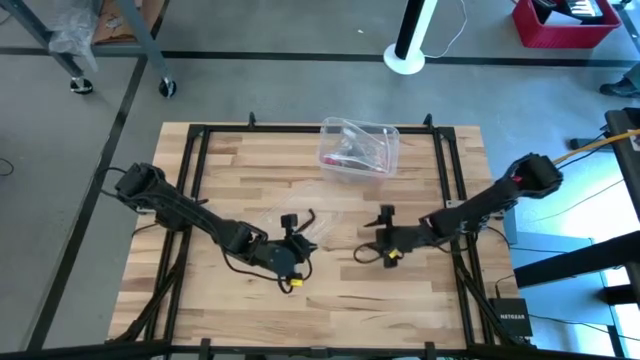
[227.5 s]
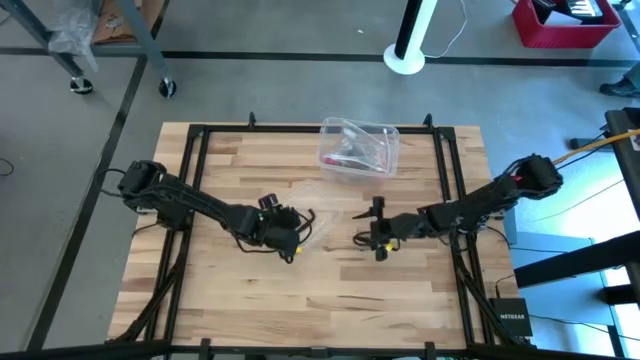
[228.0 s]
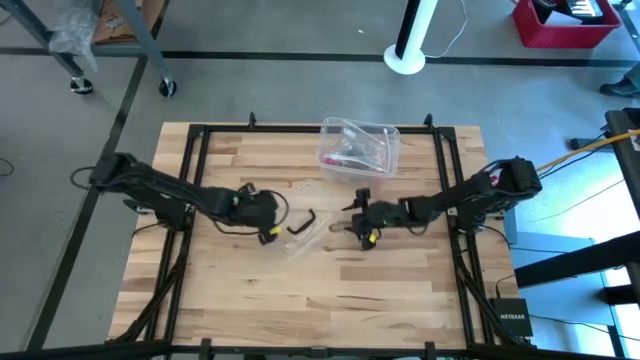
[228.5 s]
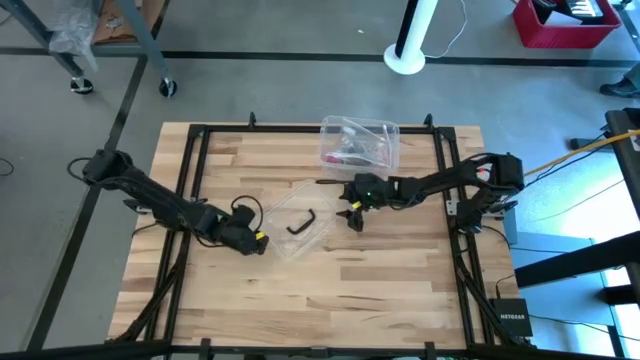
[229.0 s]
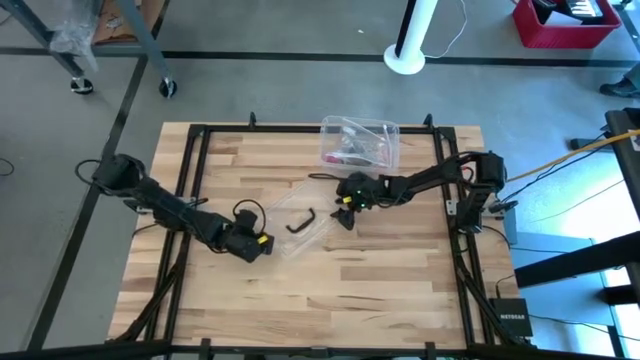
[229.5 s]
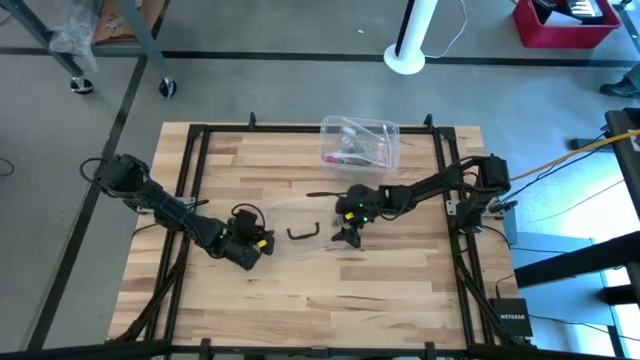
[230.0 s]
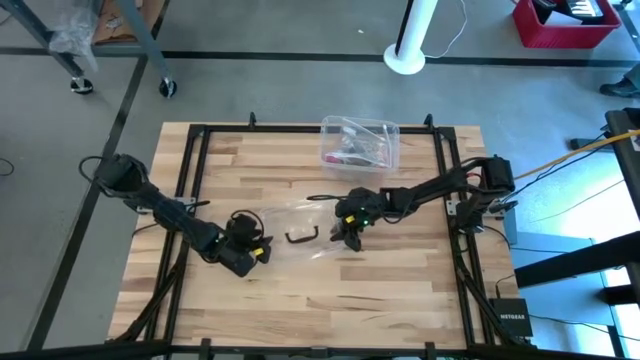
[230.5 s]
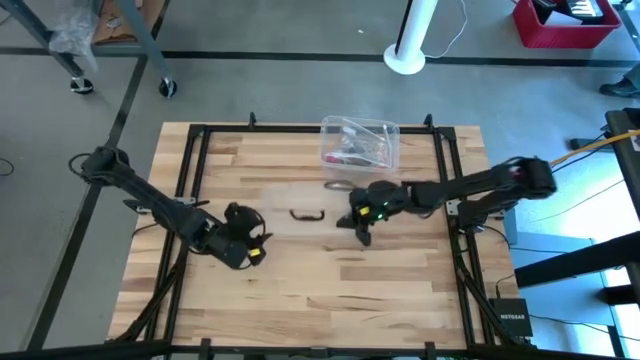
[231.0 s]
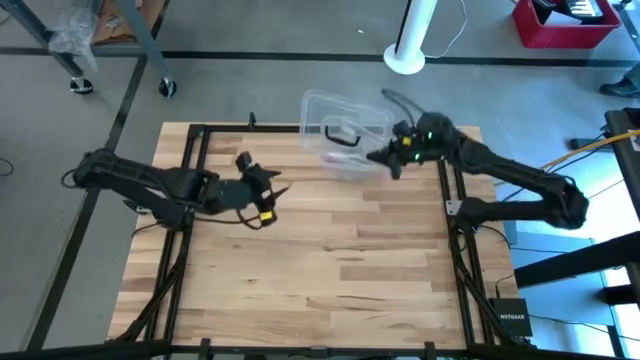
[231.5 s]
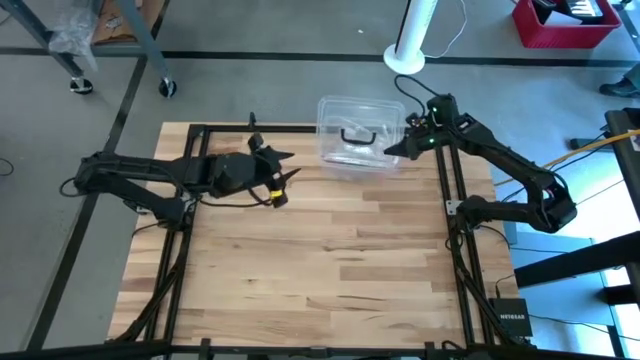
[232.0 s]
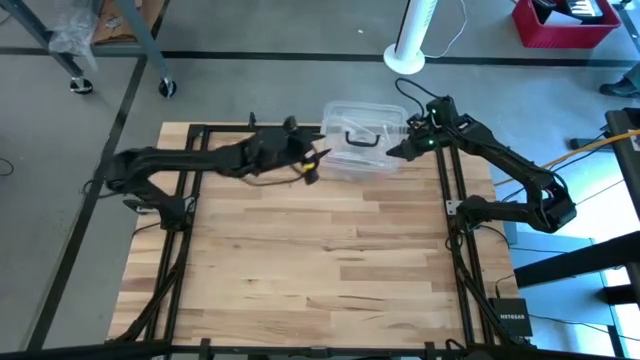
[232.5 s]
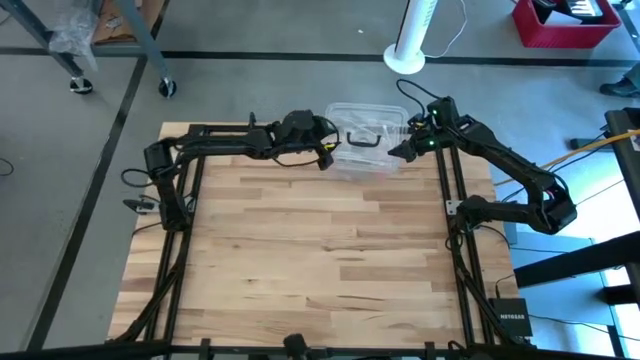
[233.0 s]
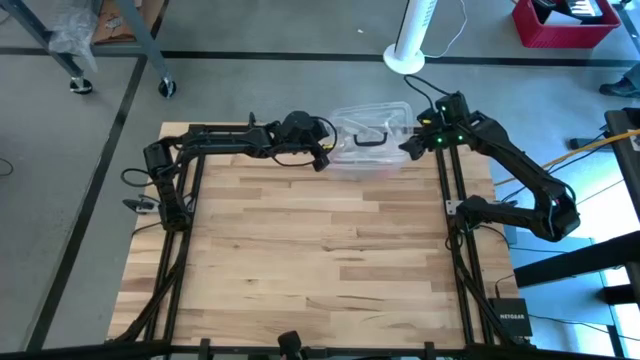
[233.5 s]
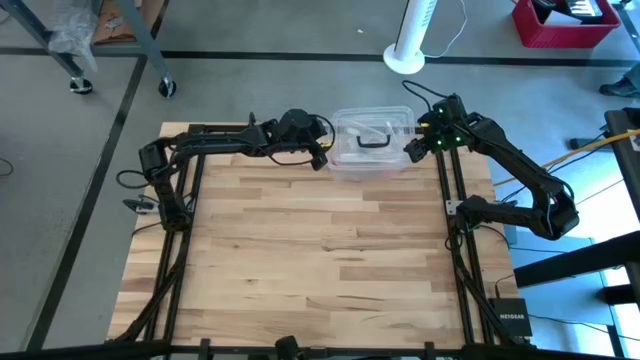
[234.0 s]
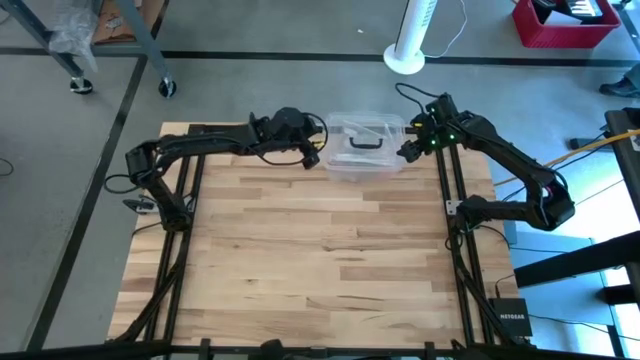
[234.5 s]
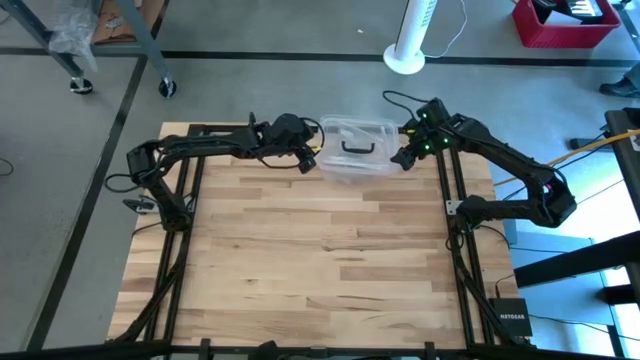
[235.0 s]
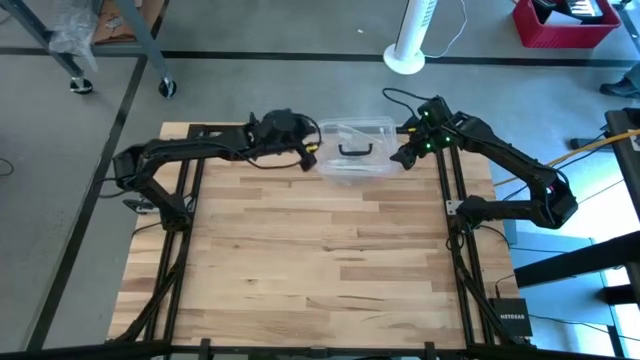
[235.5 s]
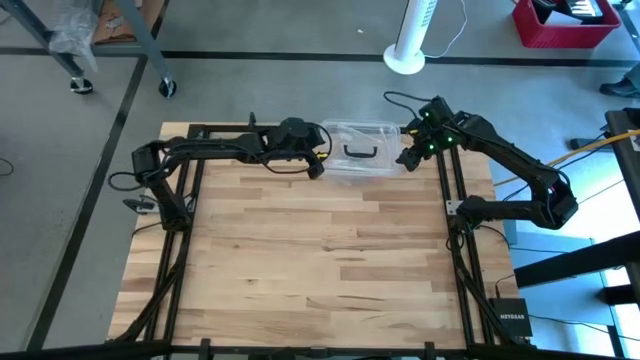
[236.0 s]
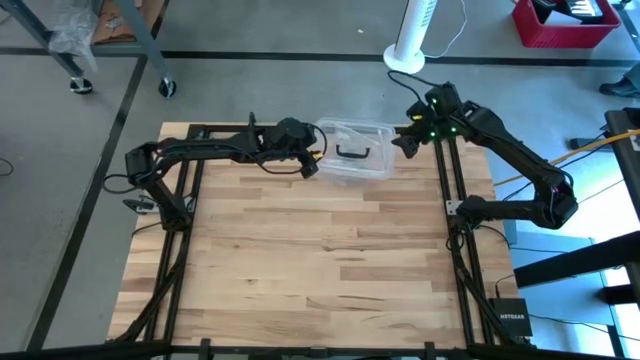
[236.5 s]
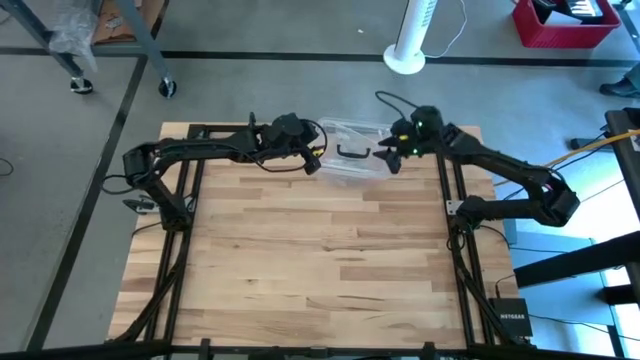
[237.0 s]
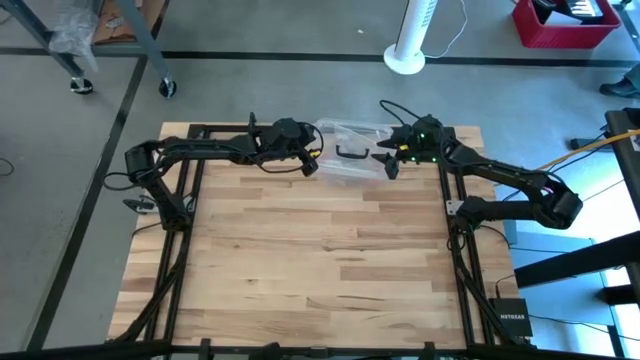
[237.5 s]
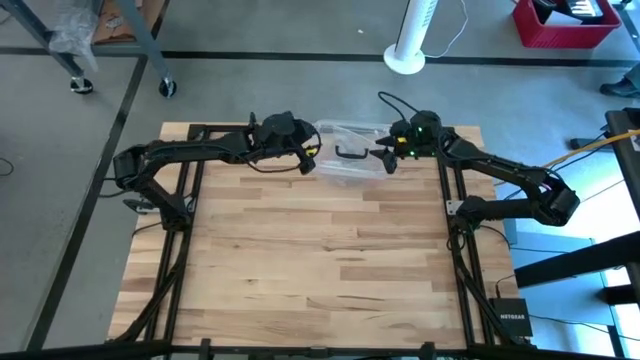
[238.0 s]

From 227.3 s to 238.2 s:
Task: Roll bandage
Close the transparent bin

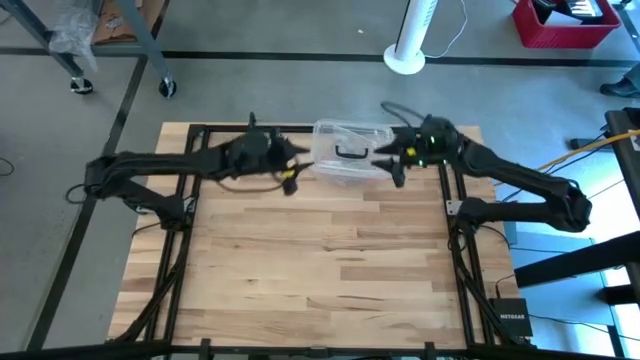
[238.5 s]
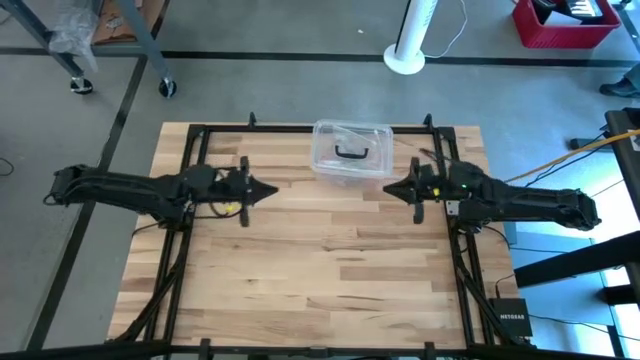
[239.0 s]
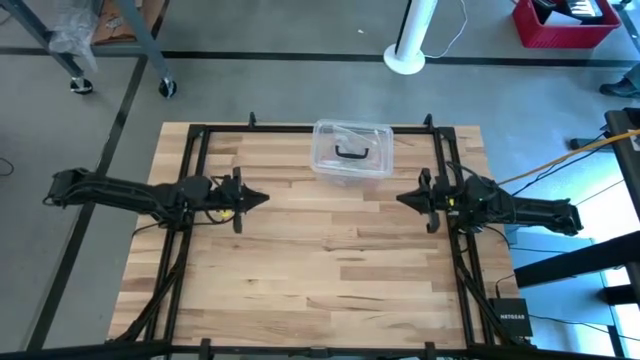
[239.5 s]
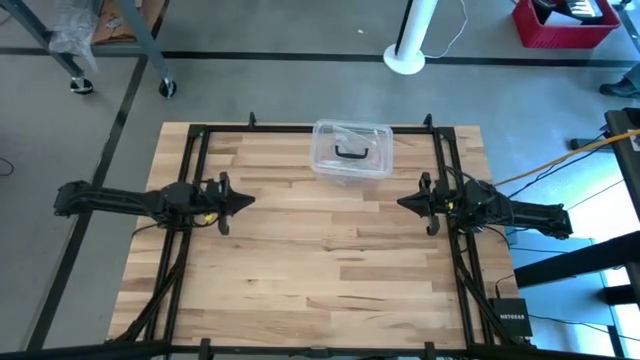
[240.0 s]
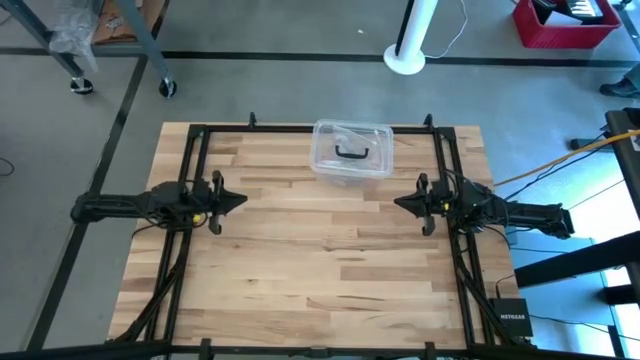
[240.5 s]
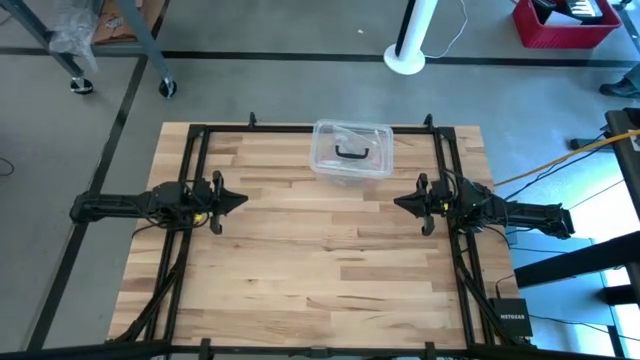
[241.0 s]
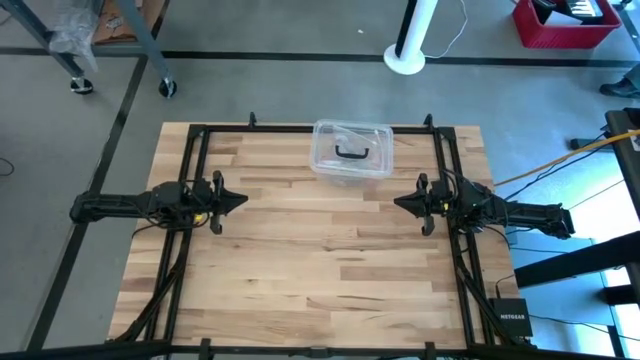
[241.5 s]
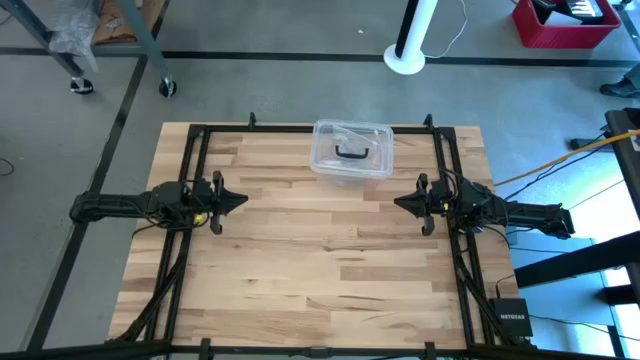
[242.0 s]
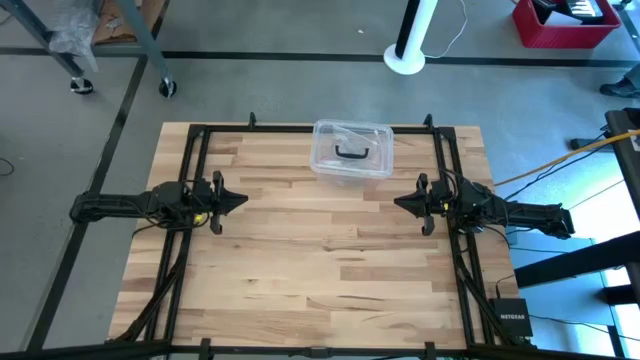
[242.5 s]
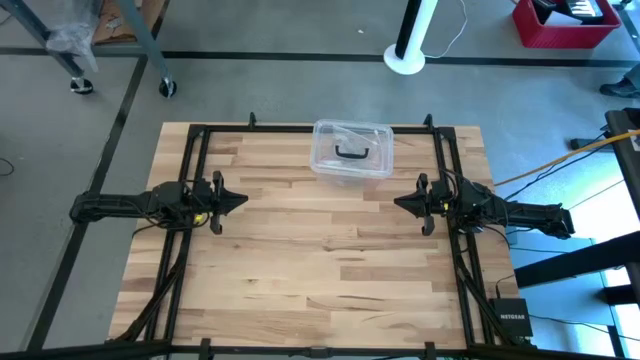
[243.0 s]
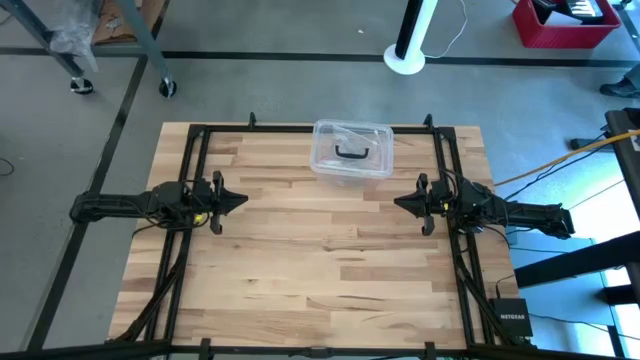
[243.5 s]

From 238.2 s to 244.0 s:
Return to Home Position

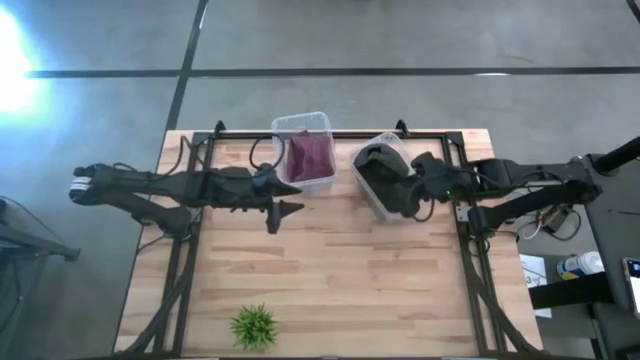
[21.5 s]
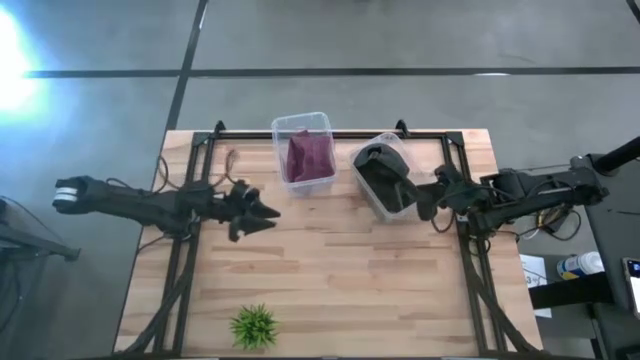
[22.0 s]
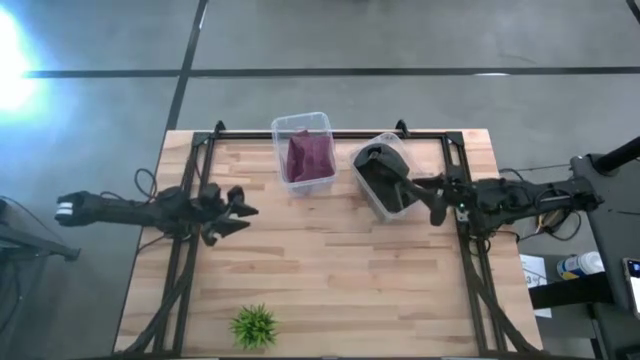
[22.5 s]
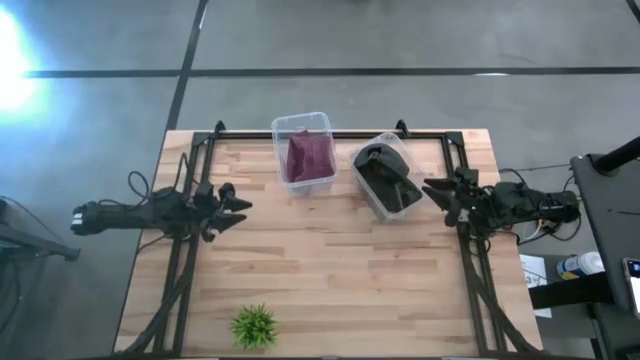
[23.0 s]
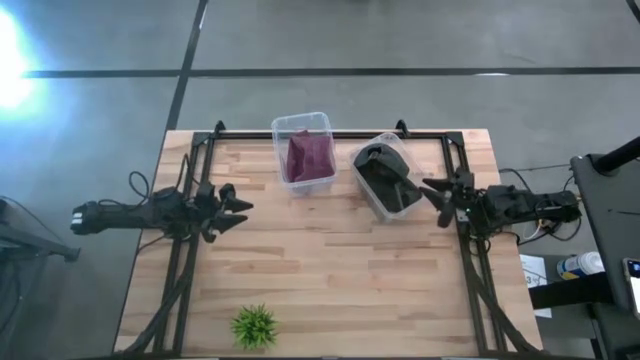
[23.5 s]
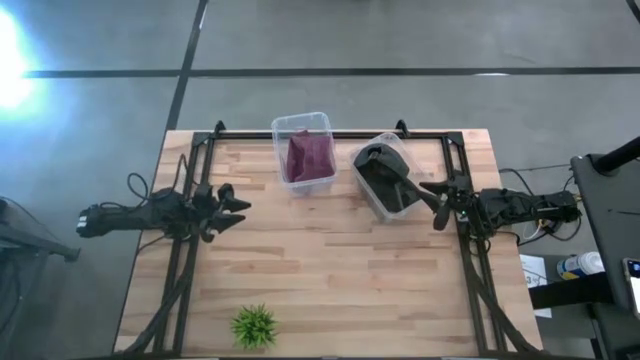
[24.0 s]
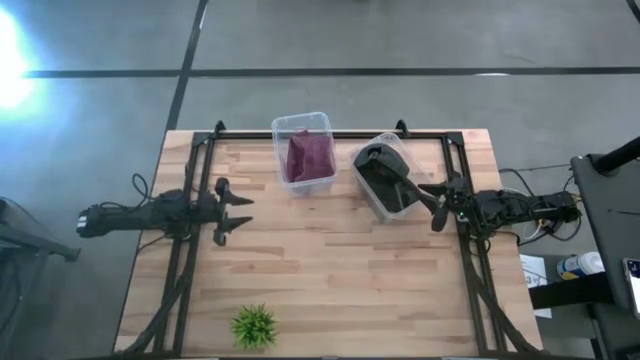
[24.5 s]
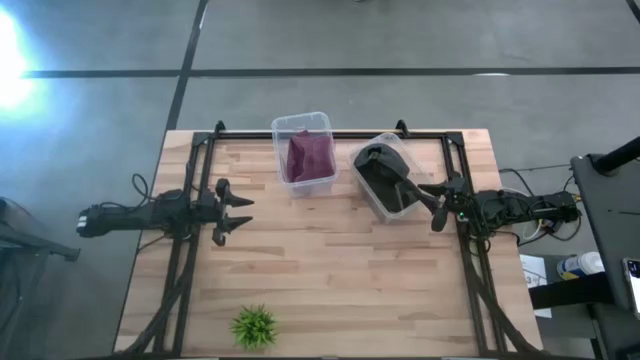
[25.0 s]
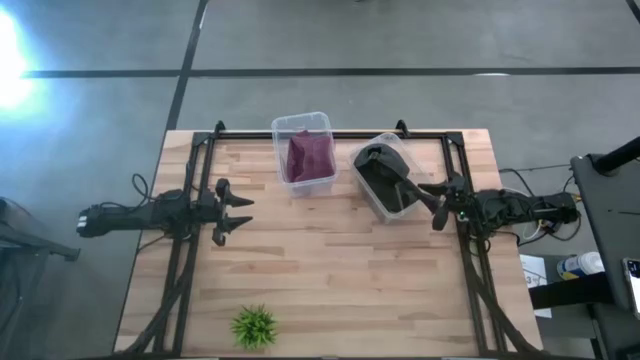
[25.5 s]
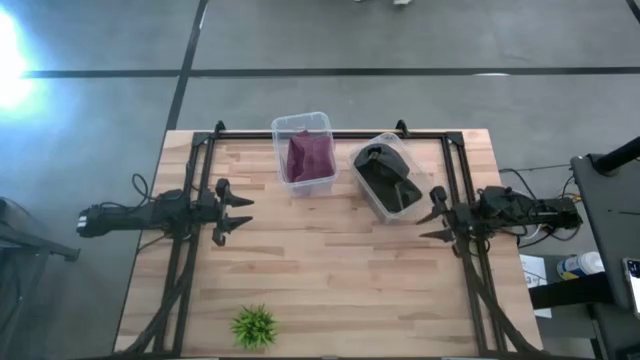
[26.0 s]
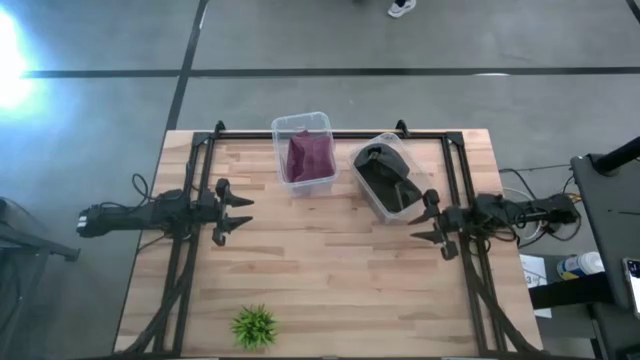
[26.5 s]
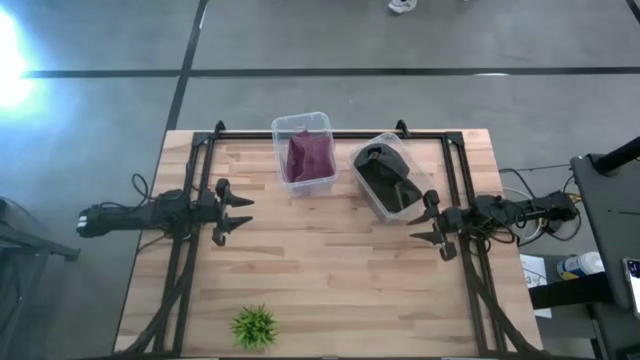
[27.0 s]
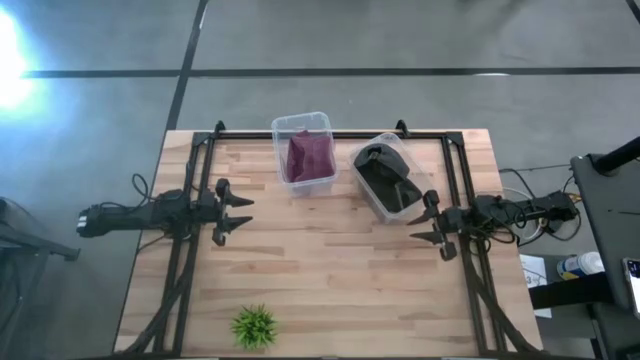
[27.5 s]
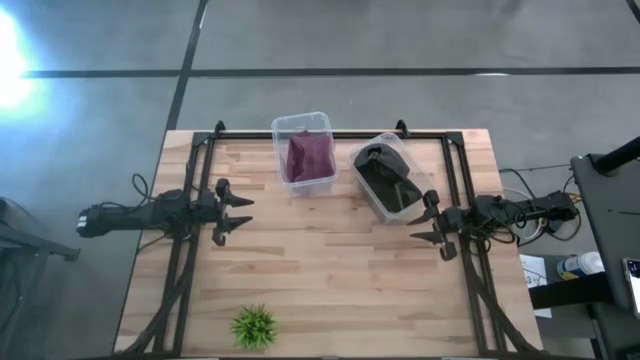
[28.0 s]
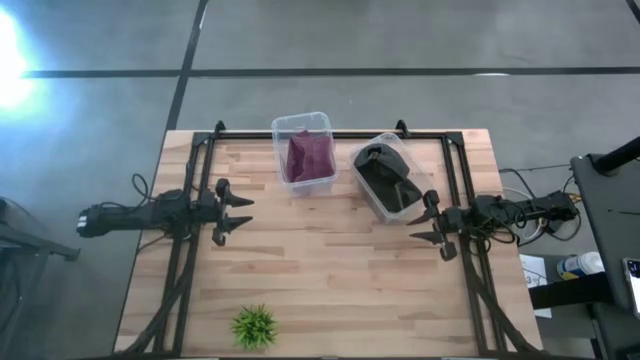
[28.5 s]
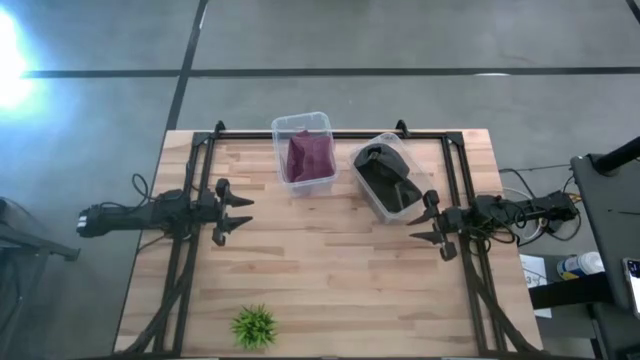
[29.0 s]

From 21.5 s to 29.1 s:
Task: Pick & Place hat
Return to Home Position
